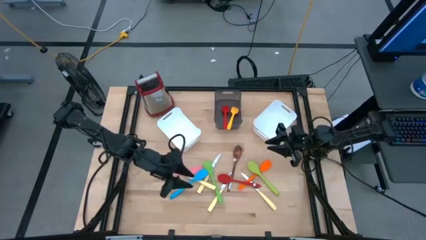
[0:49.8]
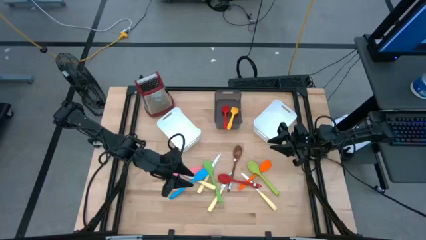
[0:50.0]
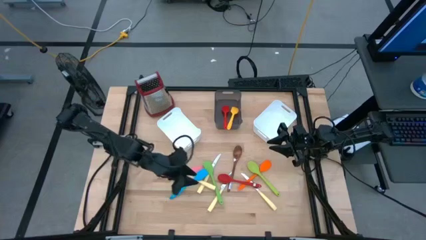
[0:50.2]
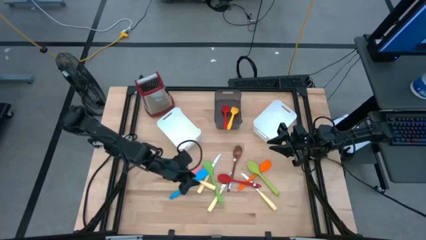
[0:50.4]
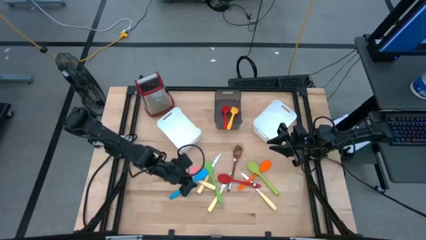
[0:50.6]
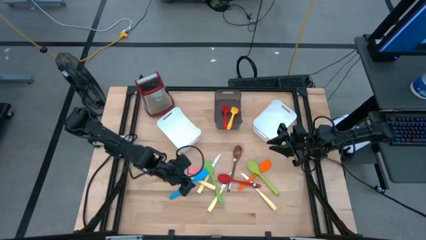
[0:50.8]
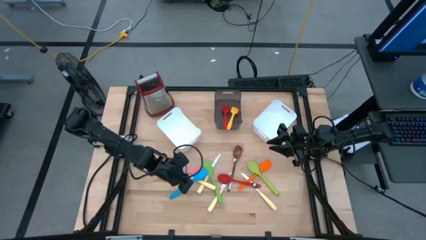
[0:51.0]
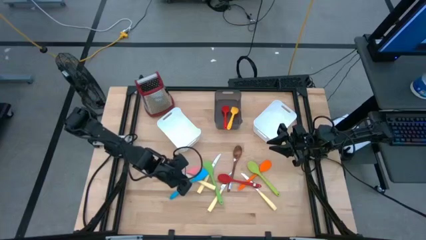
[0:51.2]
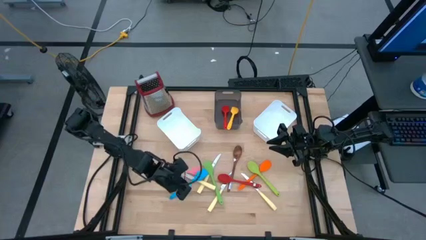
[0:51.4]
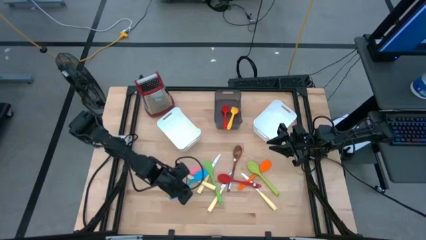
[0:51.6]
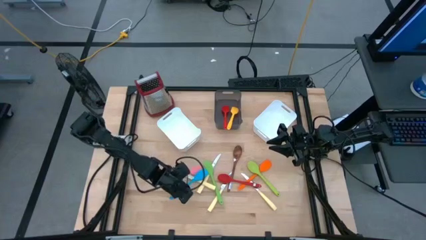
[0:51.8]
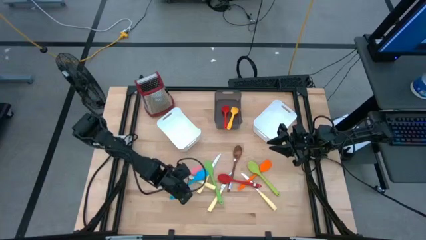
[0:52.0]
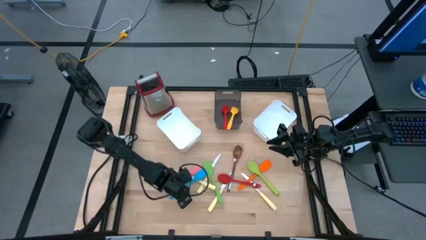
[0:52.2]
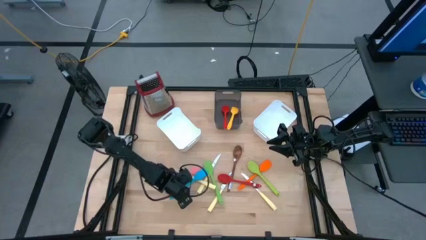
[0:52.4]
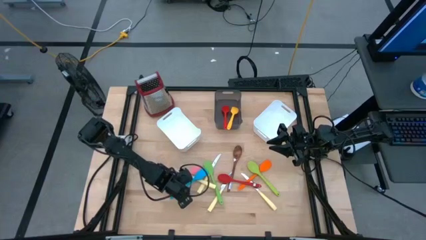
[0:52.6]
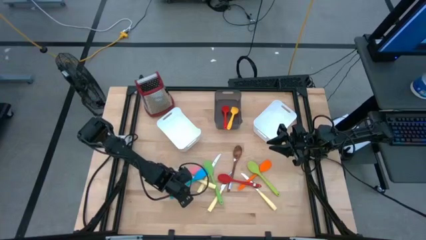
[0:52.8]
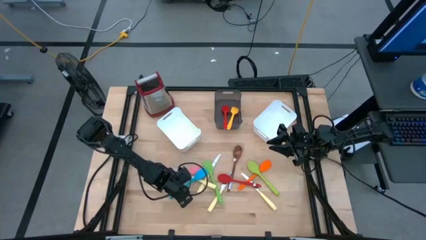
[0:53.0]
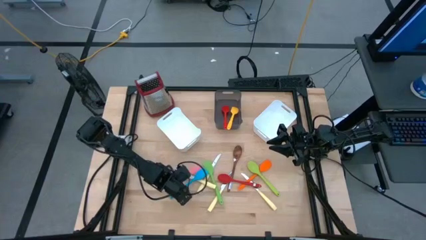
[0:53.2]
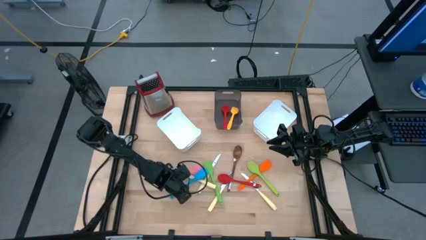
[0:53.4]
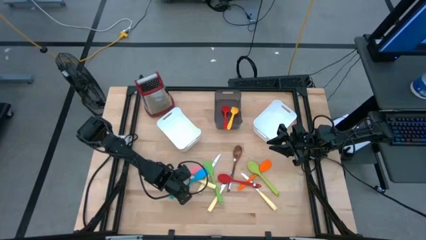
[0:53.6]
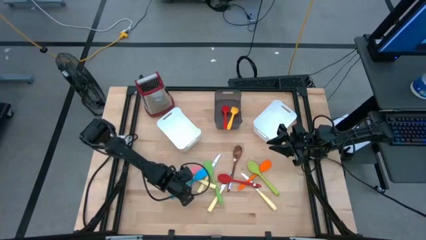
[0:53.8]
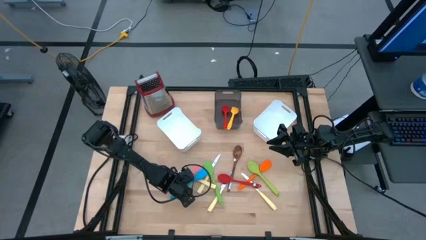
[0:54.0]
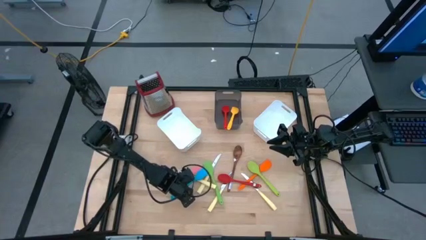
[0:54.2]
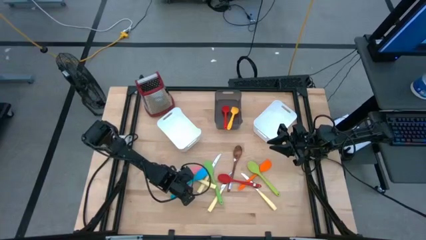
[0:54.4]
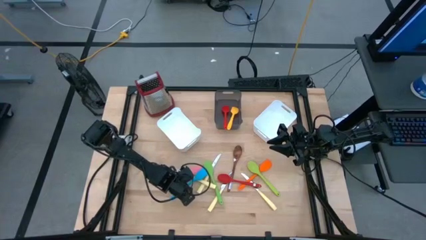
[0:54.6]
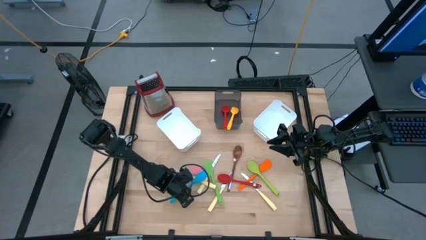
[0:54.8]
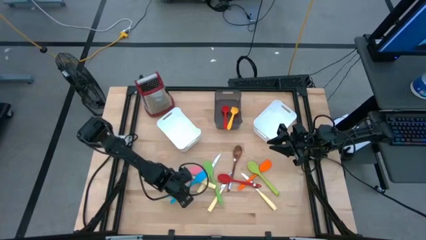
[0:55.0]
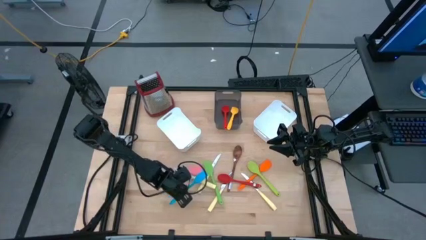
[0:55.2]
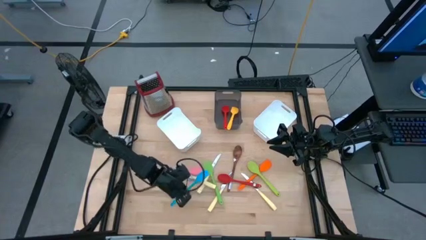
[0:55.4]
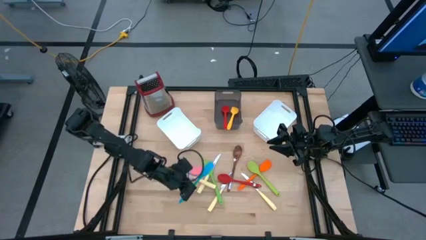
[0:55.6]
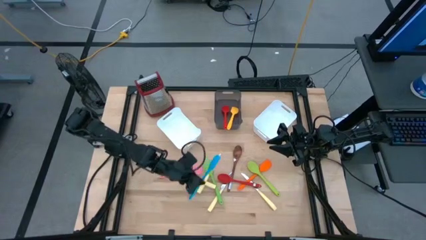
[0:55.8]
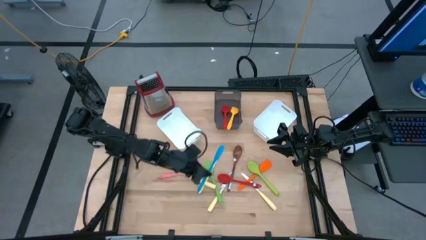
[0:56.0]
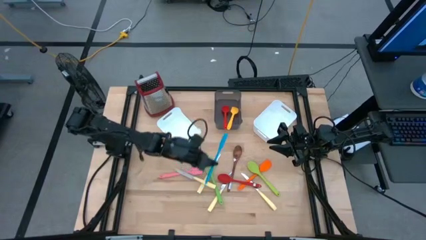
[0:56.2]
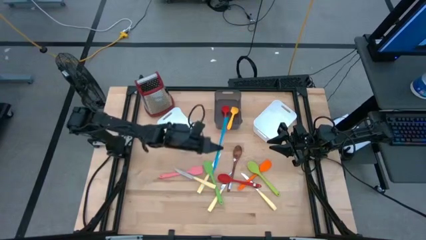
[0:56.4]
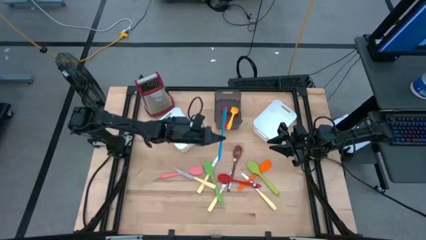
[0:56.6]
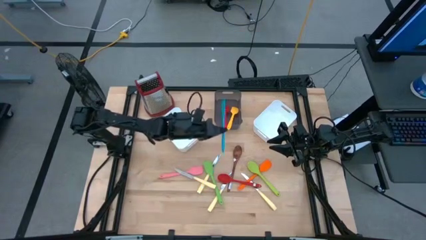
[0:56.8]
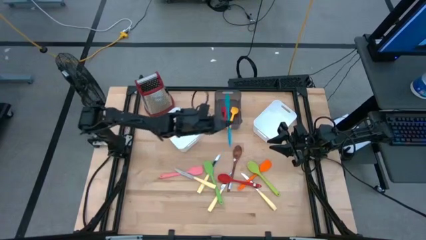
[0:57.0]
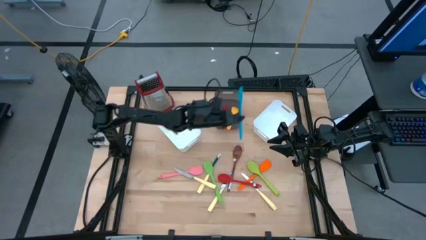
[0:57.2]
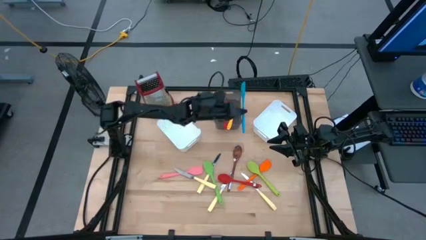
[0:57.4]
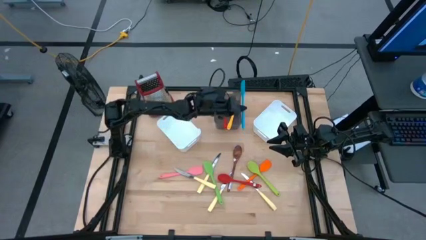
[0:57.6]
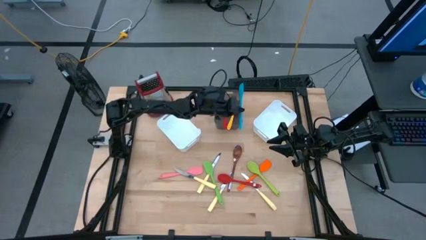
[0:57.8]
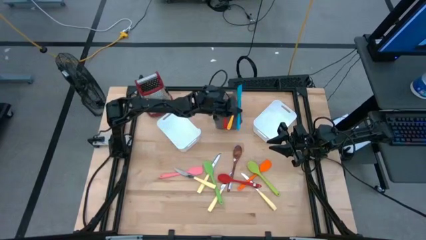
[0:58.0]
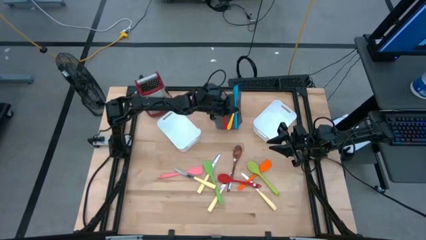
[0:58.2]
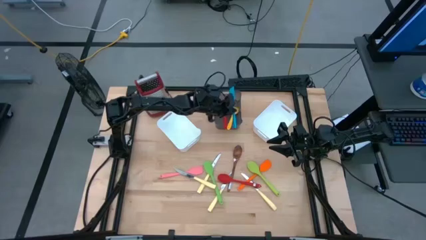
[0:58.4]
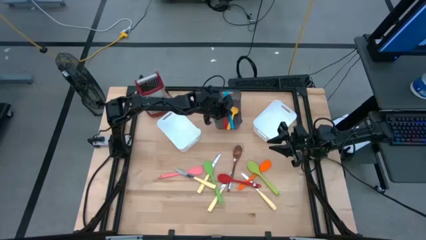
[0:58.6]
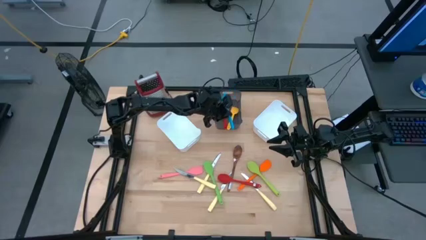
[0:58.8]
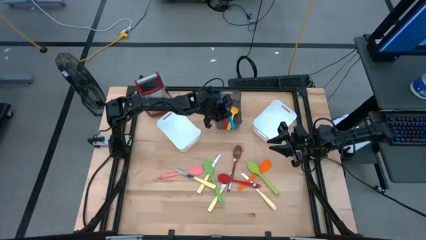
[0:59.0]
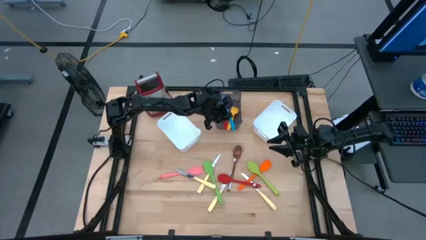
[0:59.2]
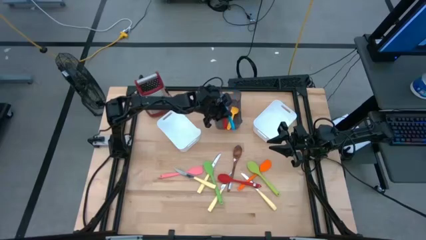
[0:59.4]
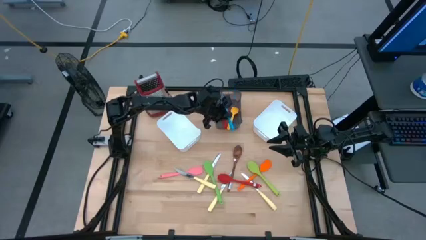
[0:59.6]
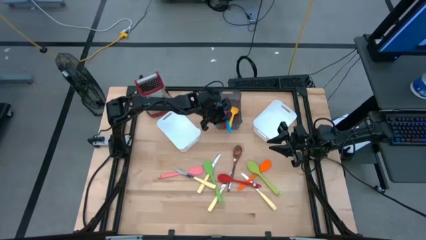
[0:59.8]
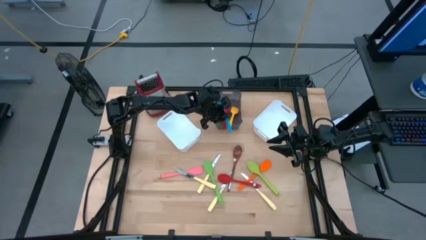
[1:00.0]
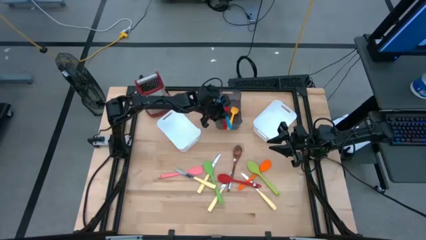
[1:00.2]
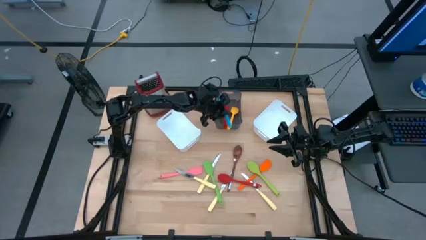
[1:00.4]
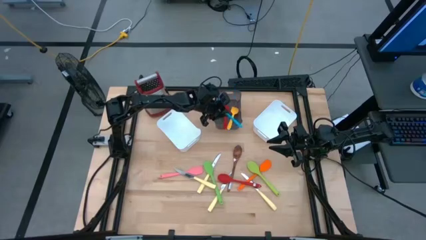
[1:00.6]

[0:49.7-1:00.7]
Task: Pick & Place Kitchen Items
Put the blue spatula into the black bin
